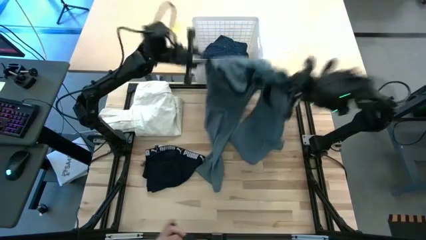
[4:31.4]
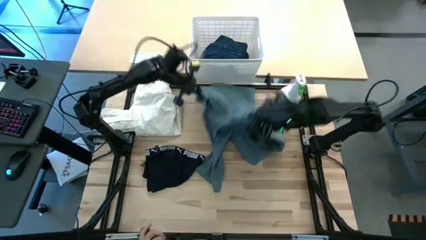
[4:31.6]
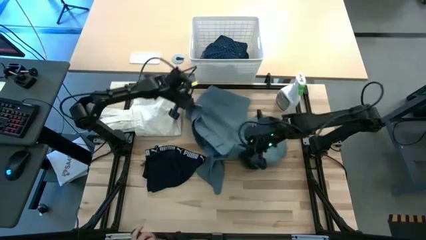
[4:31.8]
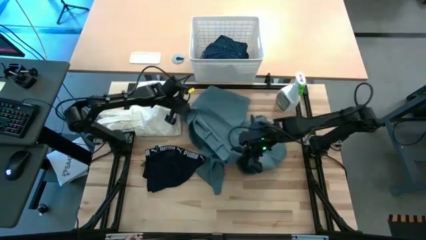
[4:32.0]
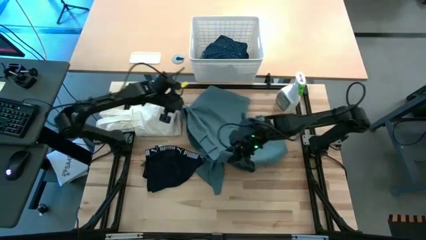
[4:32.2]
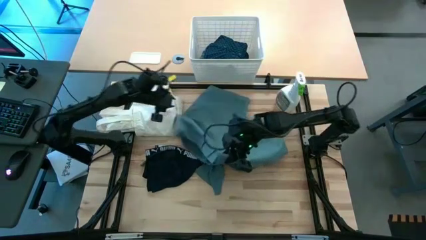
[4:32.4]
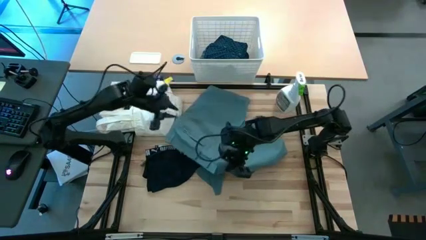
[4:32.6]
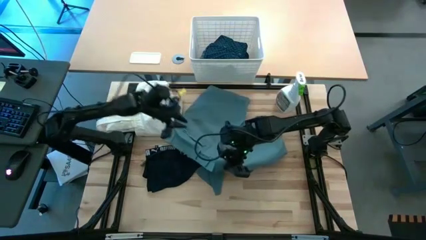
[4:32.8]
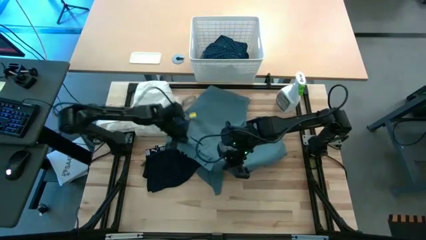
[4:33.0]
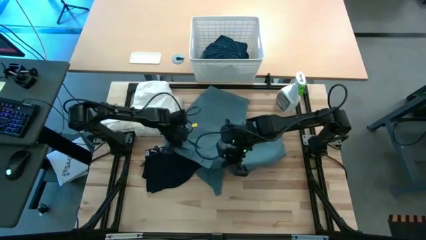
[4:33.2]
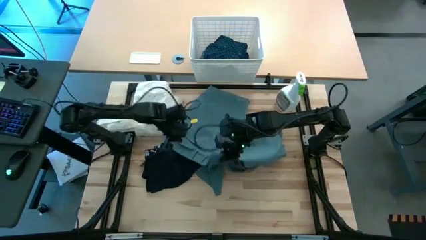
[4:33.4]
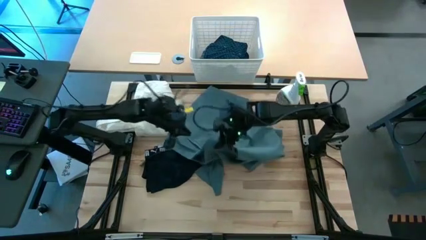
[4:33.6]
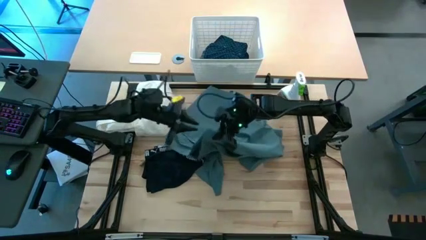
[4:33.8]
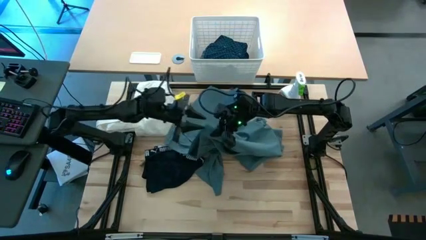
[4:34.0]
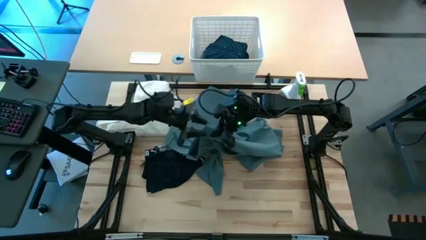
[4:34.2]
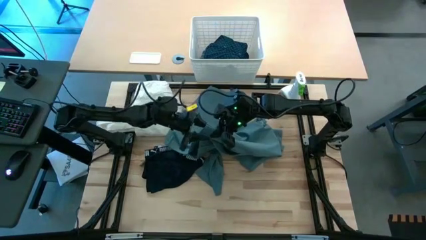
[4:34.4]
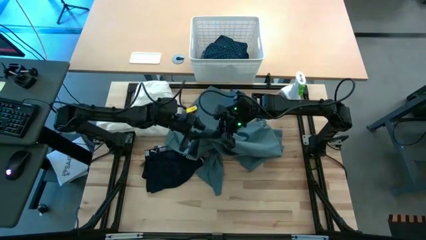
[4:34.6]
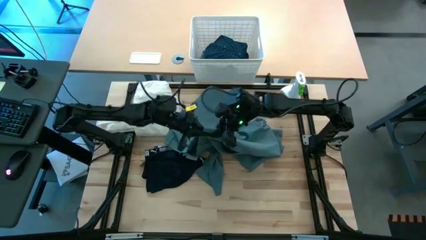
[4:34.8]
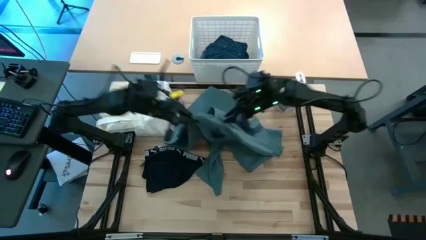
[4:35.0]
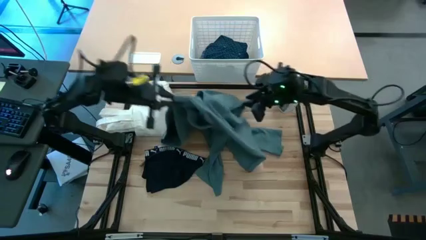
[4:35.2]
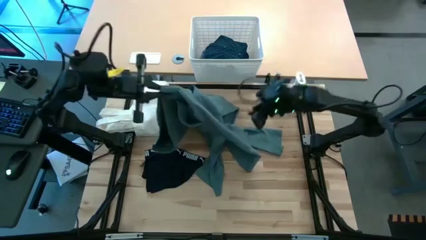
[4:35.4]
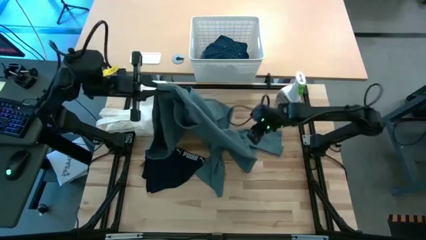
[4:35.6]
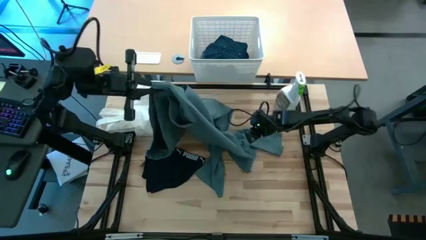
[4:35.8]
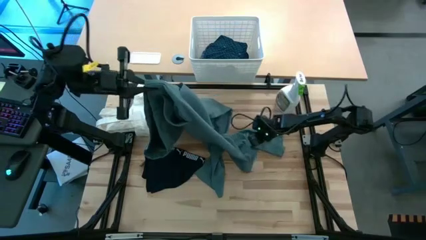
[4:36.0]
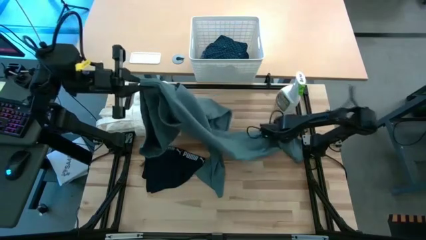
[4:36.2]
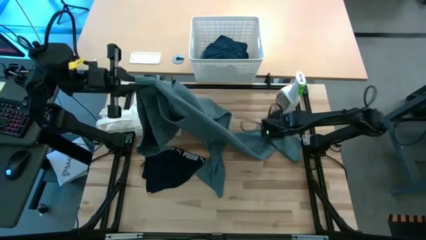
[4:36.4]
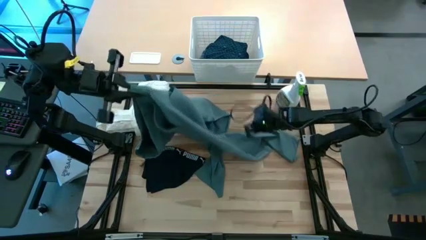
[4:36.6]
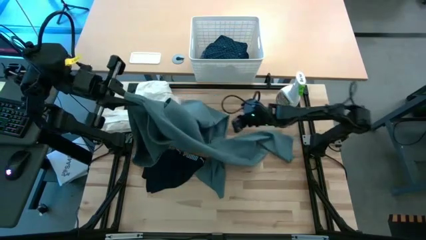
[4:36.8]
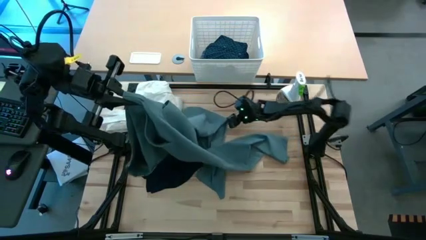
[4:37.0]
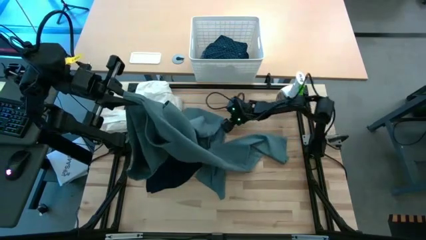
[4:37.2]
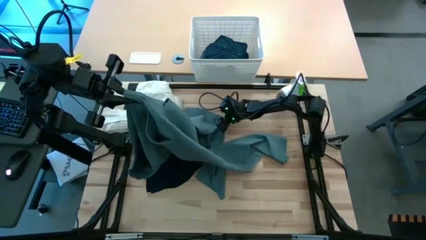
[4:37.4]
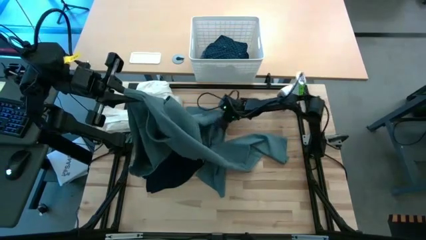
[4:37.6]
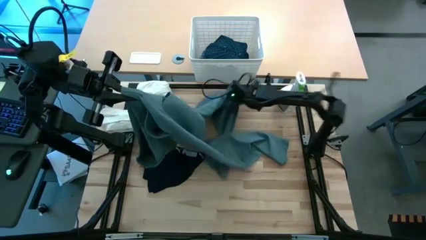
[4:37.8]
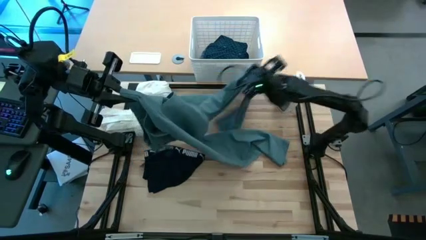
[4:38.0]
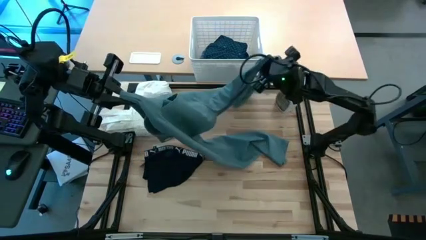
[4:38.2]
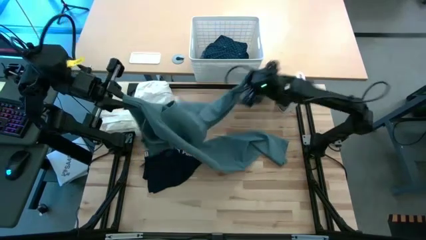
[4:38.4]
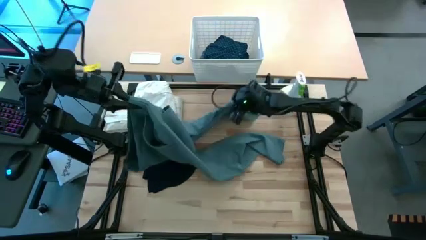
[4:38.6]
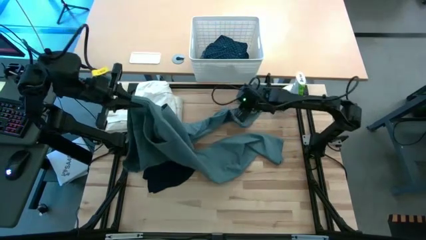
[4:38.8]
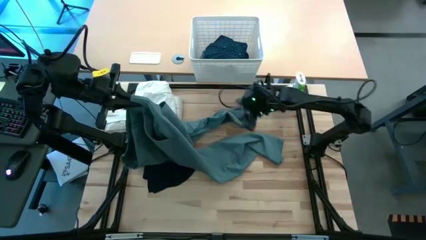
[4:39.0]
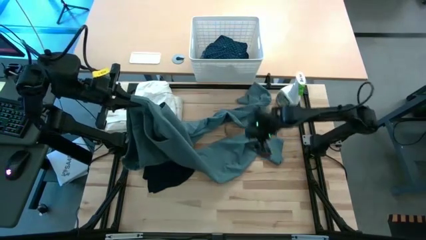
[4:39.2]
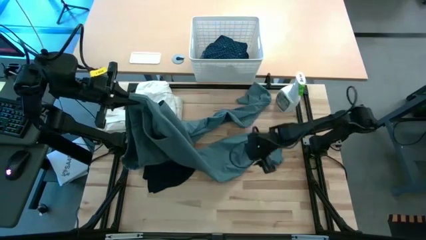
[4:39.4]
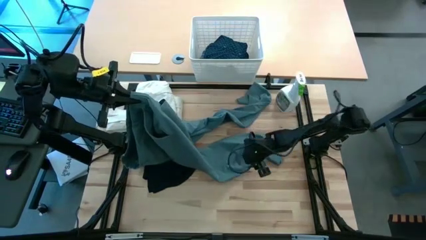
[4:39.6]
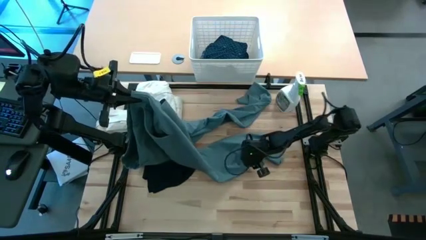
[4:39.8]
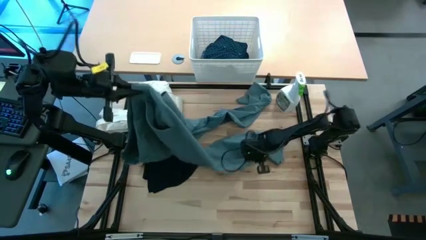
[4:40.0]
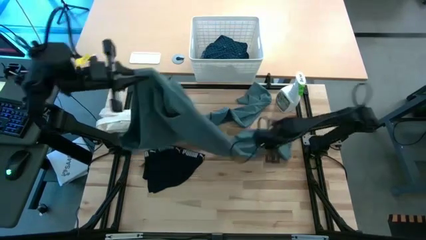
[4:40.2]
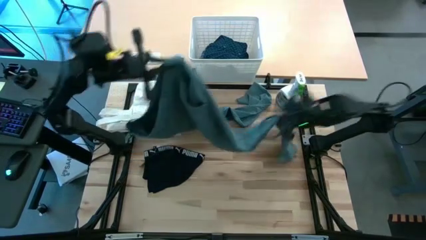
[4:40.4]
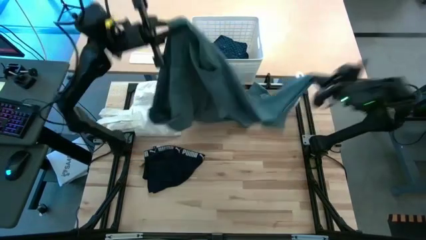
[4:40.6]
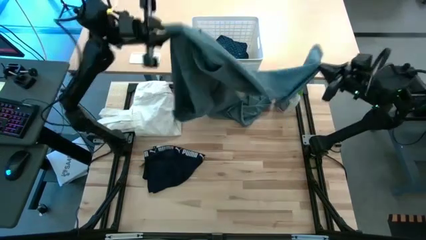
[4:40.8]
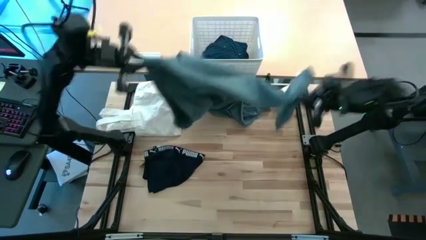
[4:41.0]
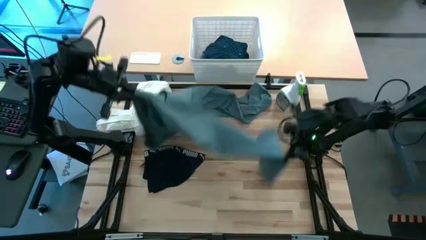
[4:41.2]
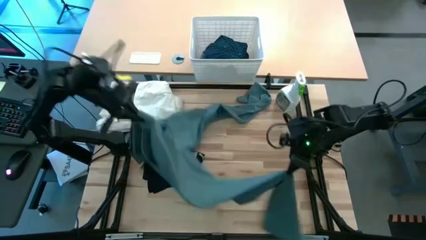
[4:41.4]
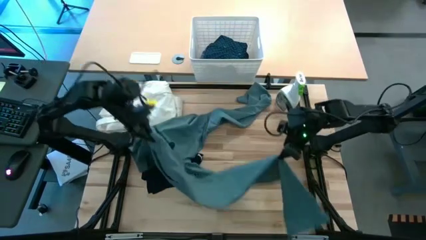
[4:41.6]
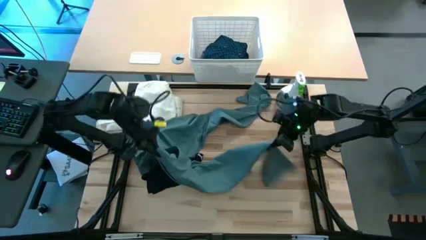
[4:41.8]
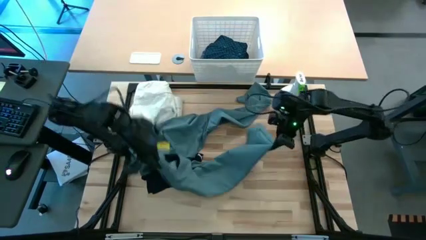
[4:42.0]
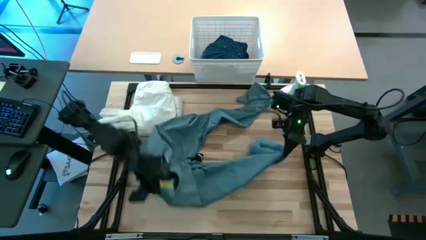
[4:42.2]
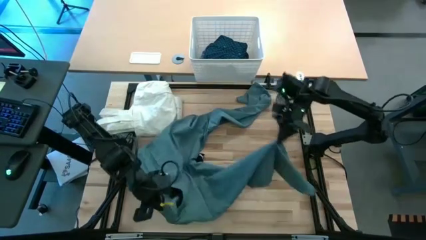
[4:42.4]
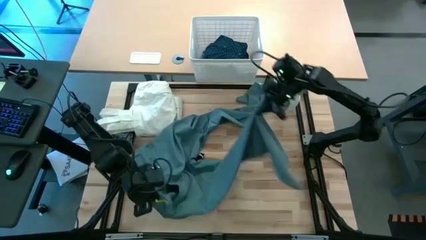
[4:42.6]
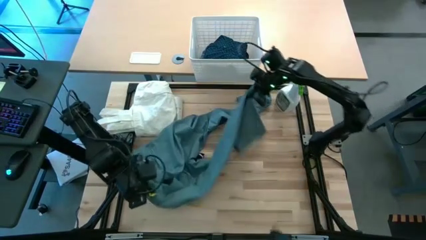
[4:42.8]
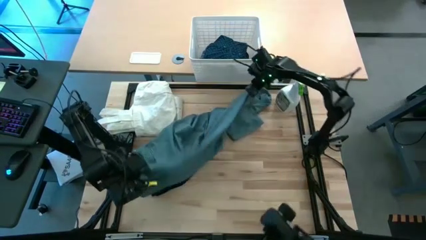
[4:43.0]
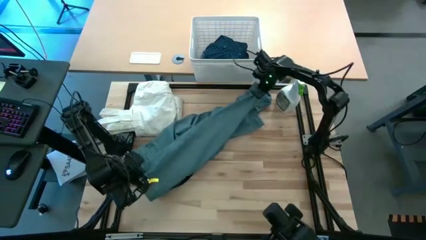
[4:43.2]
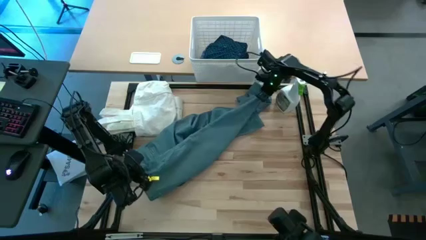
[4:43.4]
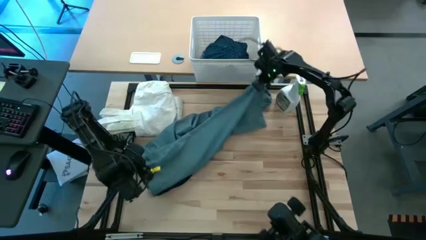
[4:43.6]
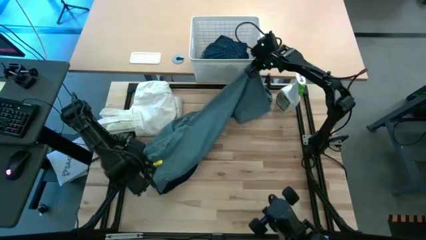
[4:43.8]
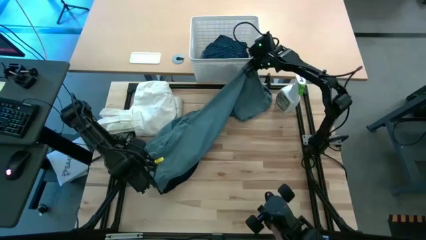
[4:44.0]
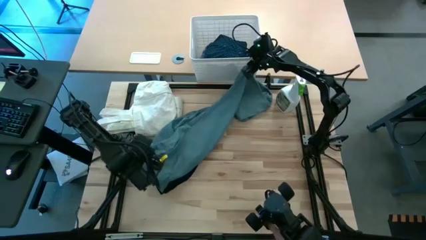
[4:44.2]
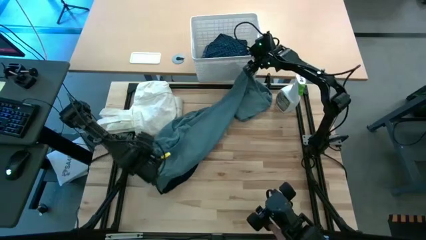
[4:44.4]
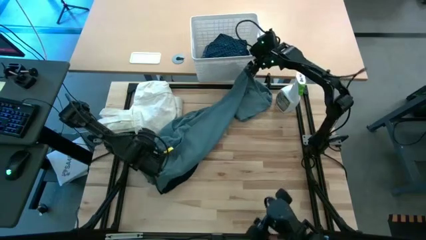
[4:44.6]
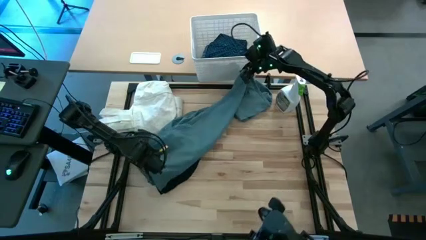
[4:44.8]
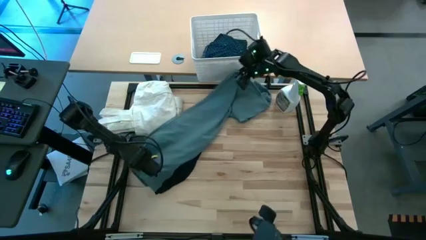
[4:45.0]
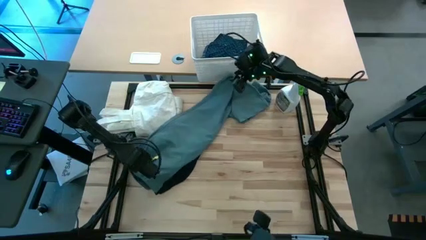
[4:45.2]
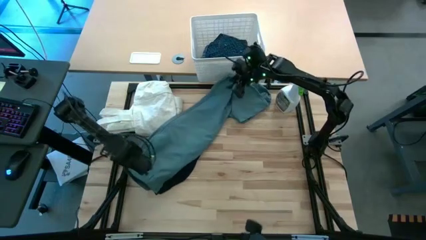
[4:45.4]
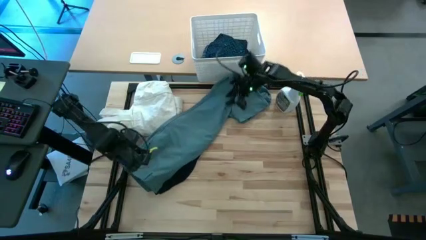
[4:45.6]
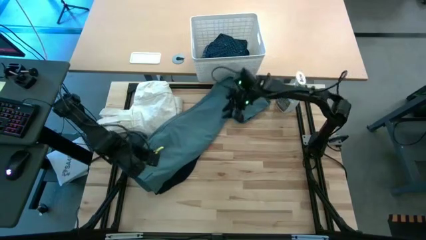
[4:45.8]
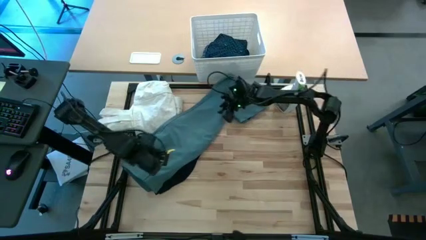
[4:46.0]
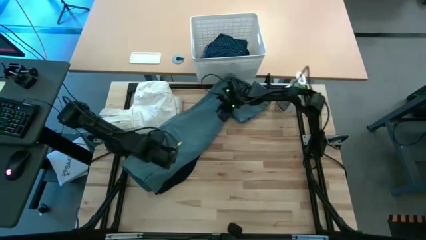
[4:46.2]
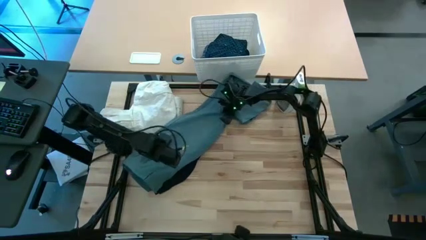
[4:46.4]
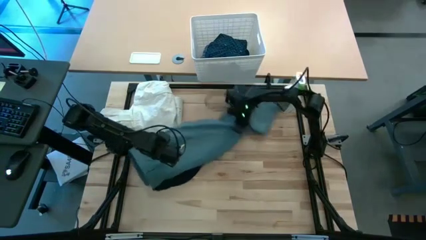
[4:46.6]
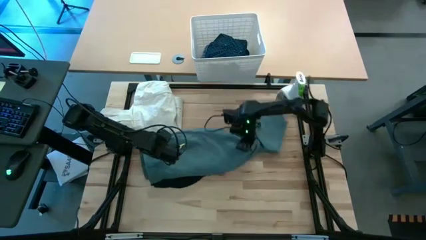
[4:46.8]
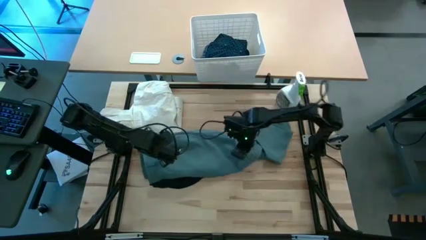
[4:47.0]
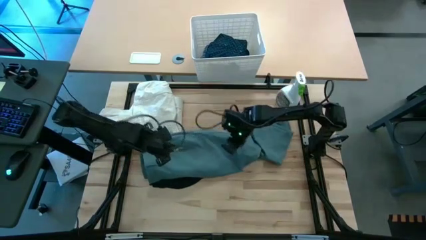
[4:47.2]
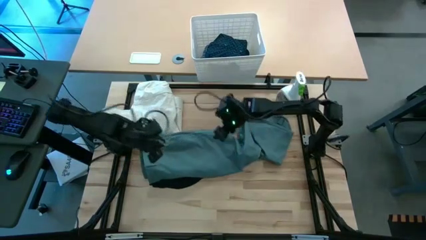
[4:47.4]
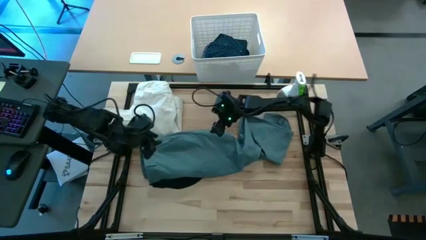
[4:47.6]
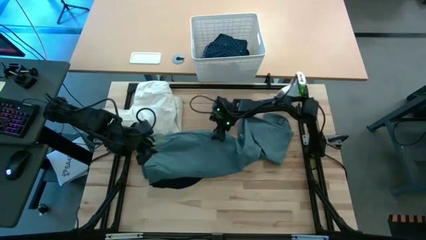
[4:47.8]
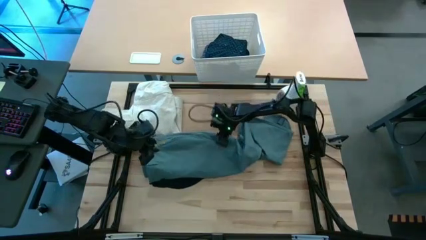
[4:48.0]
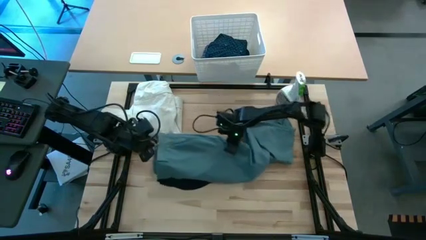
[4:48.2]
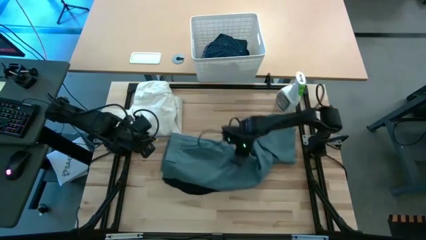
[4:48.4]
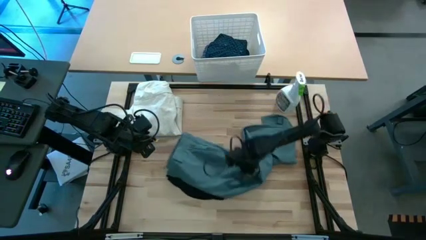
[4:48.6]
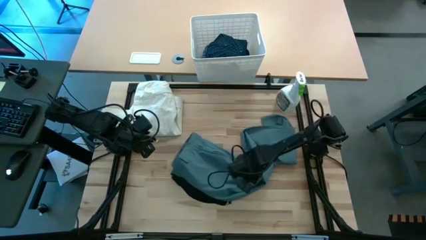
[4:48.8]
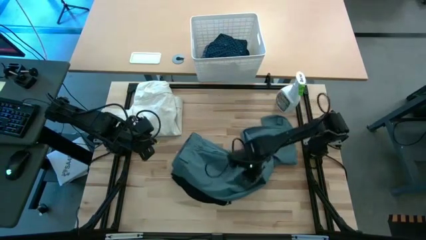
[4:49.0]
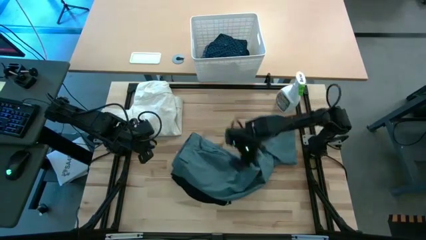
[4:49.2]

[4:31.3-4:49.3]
Fold the green pants
